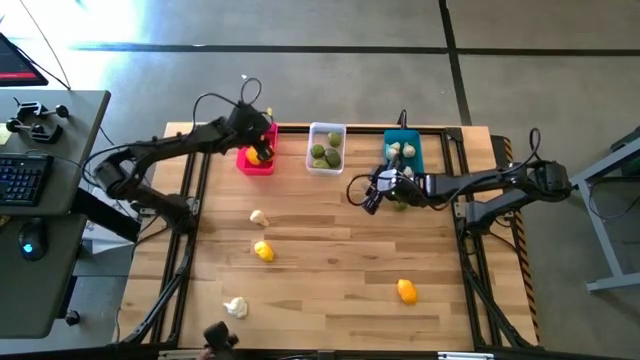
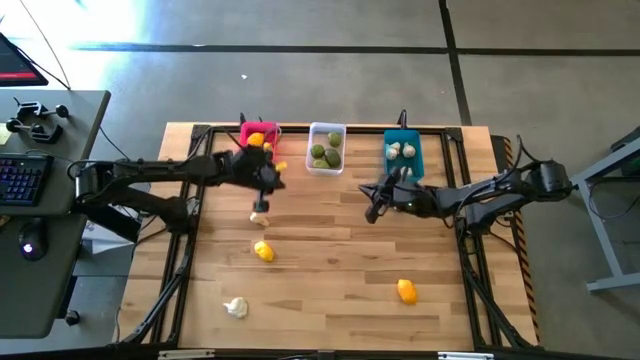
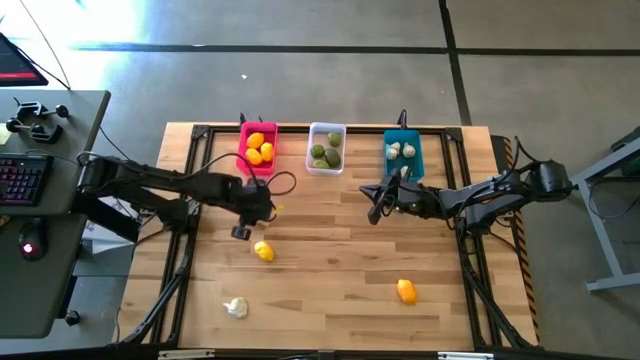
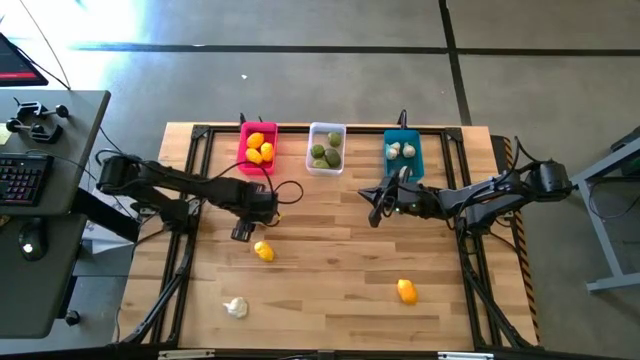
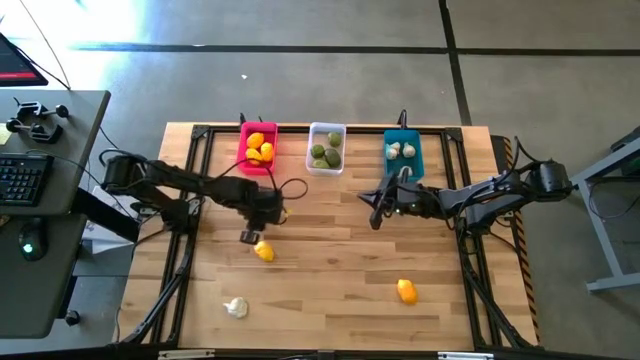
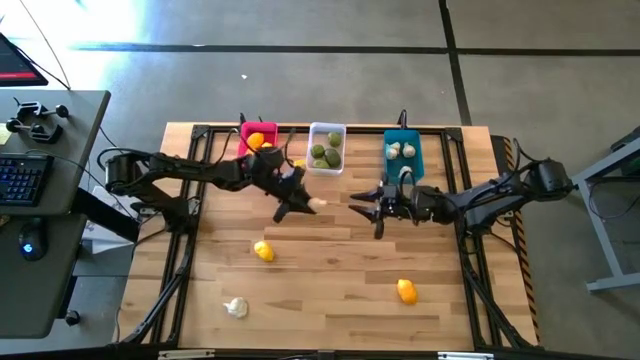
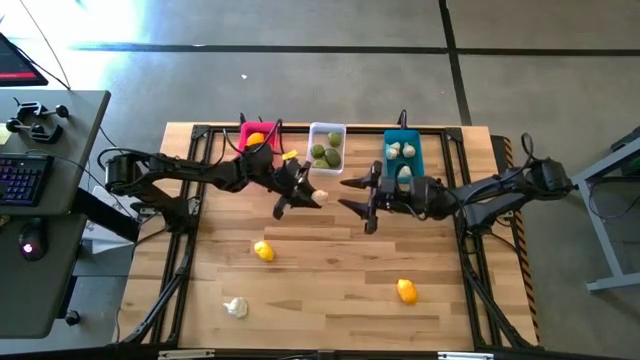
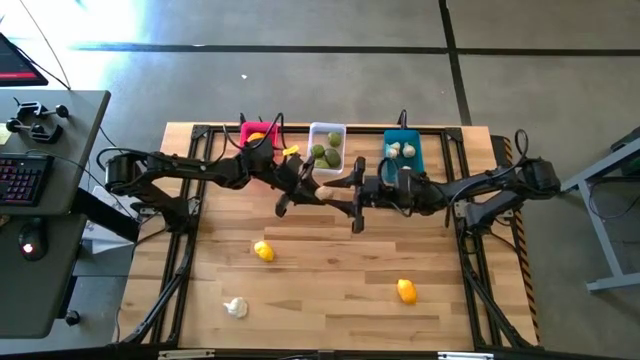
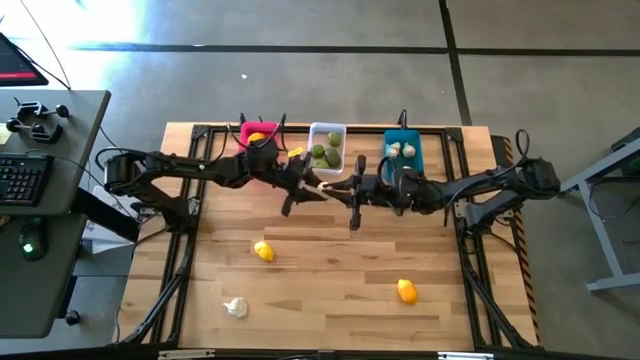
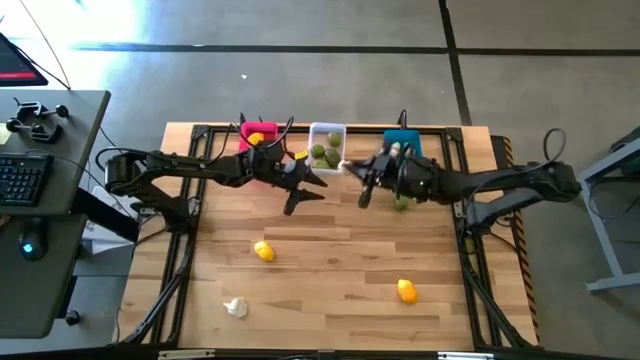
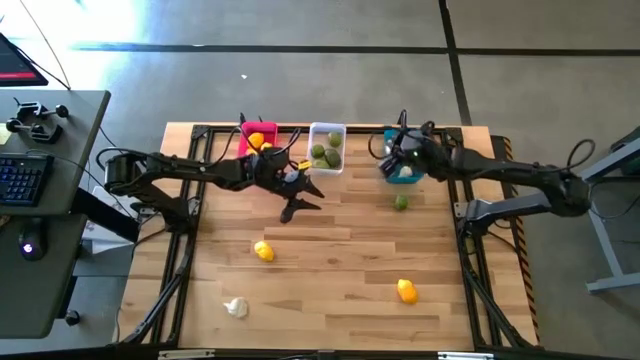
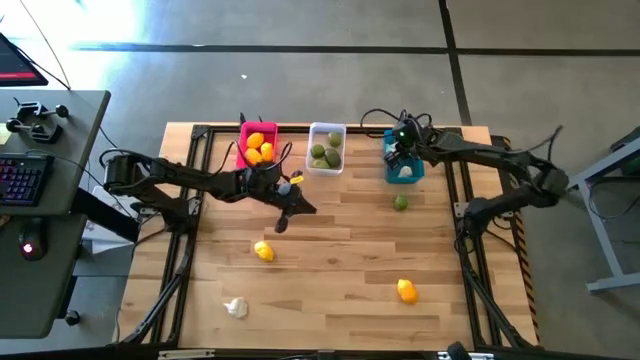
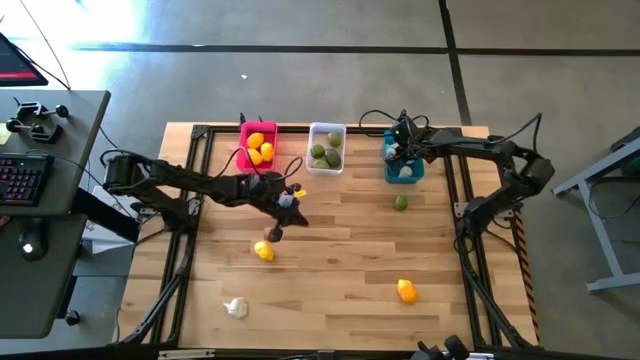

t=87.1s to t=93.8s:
Task: Sort produce into baskets
Put the white garlic into the blue bin

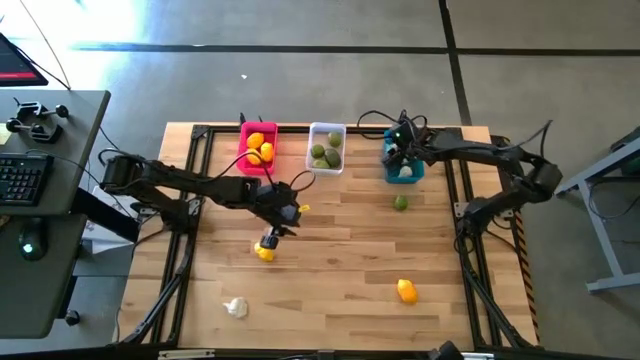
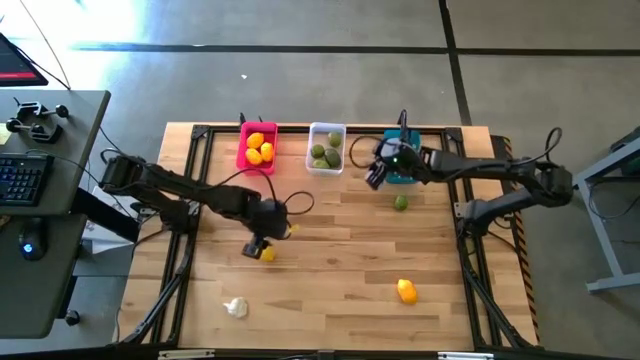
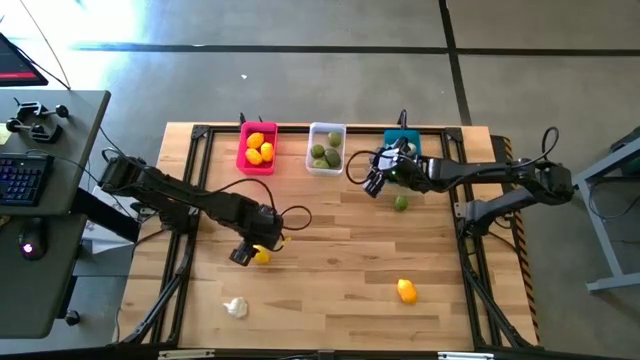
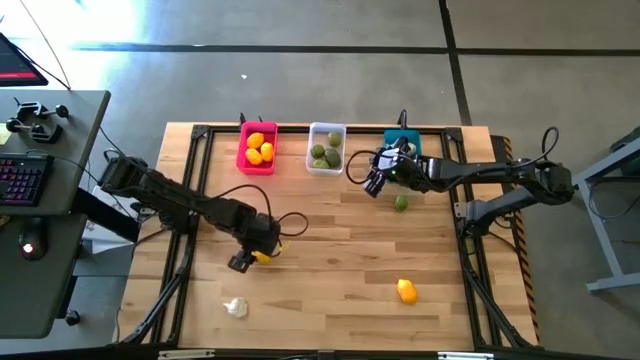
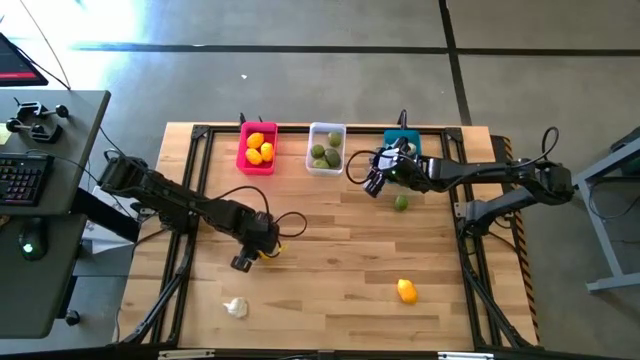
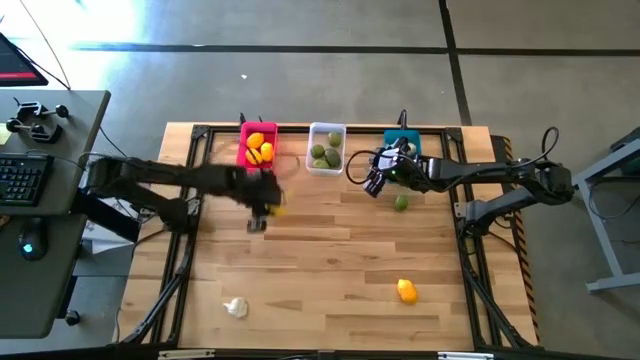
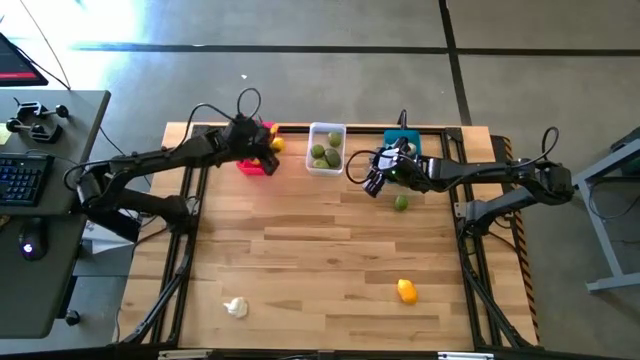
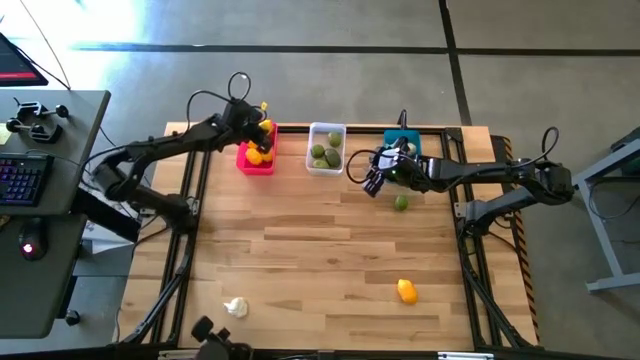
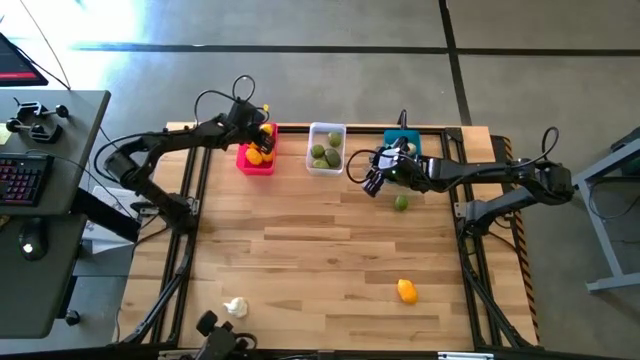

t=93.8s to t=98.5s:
Put the lemon into the pink bin

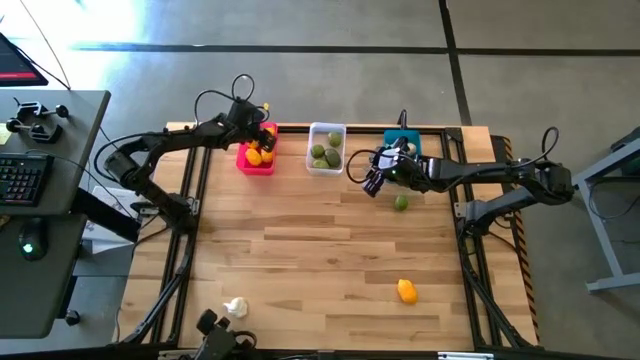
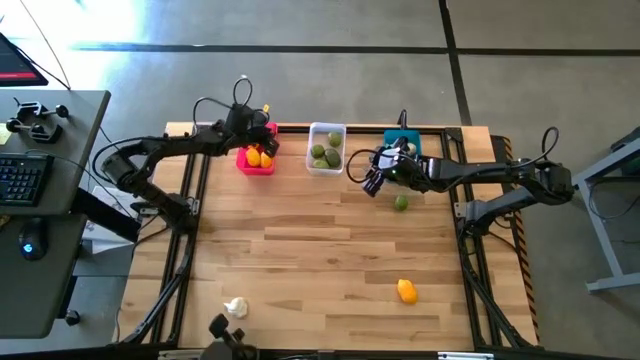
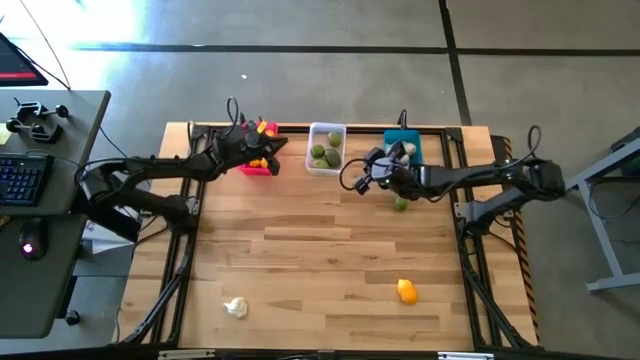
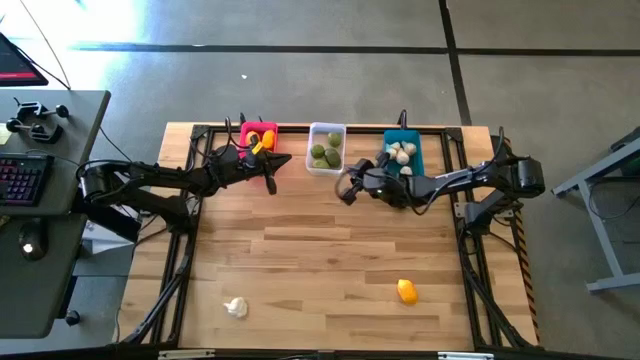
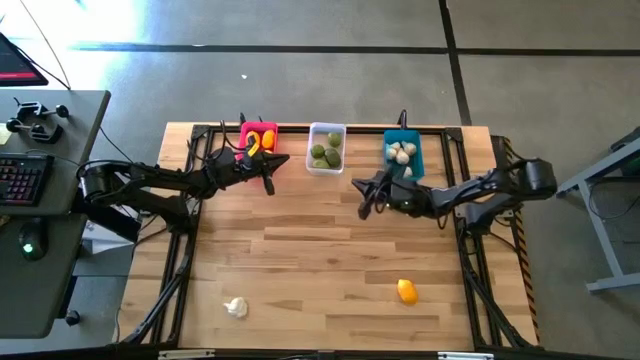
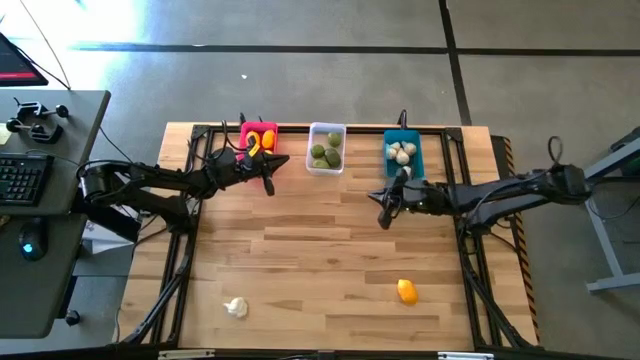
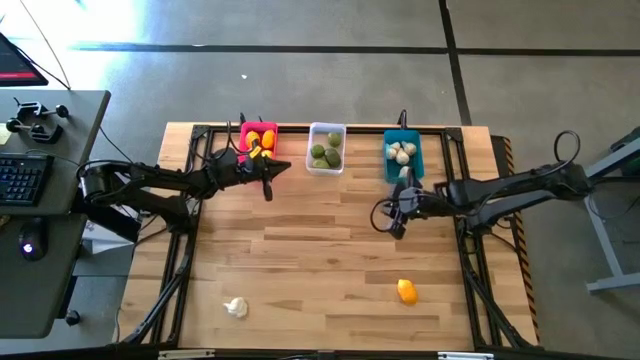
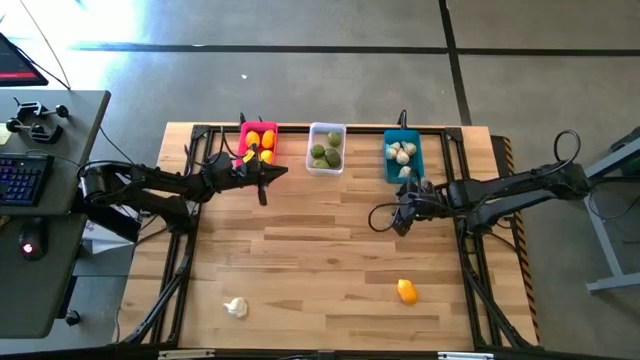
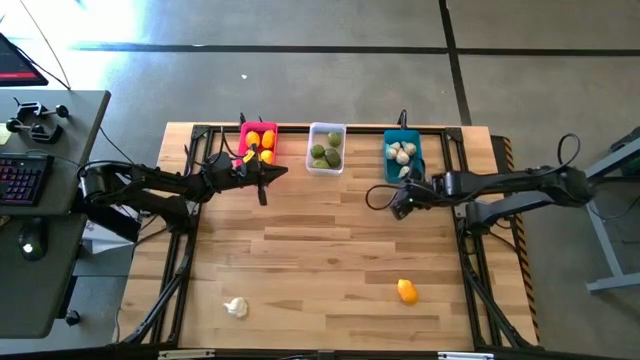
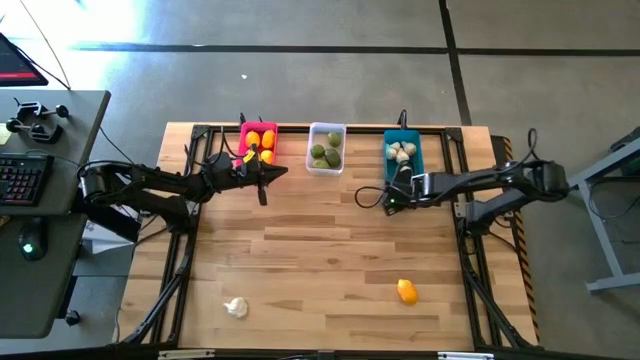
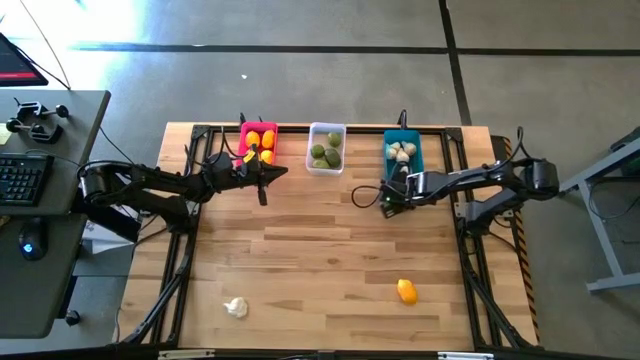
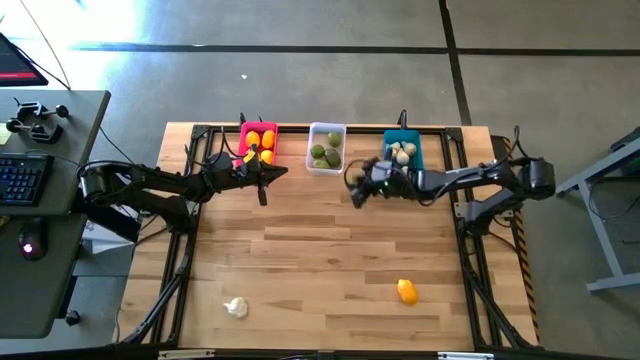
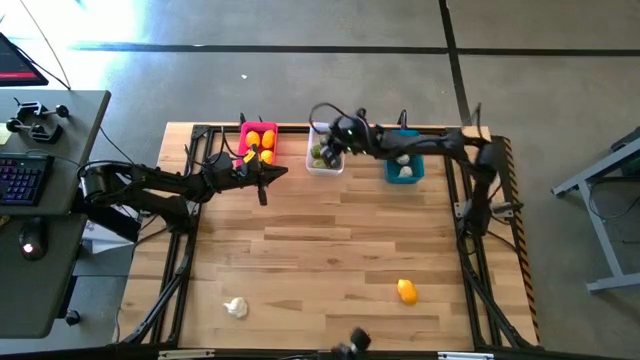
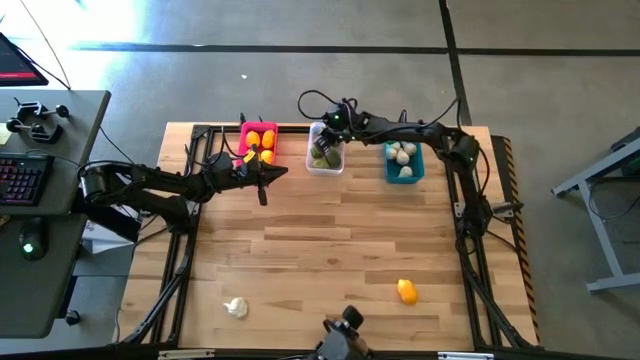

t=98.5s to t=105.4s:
Put the lime into the transparent bin

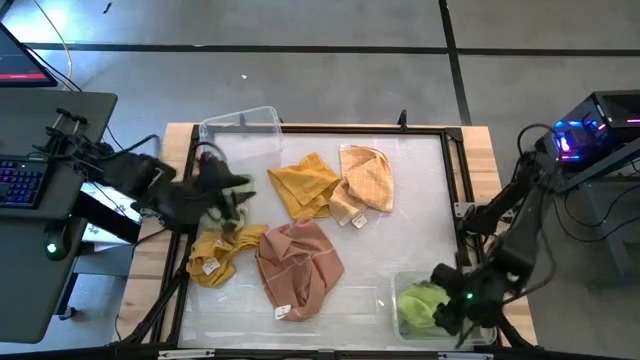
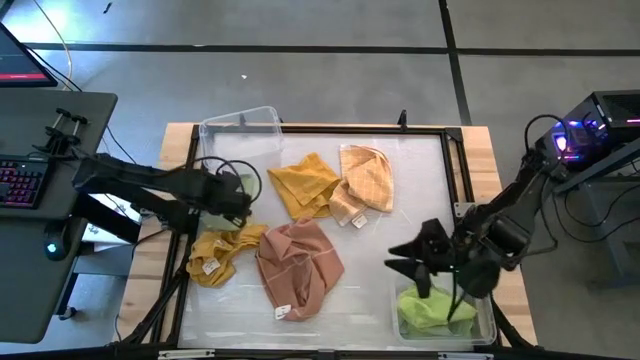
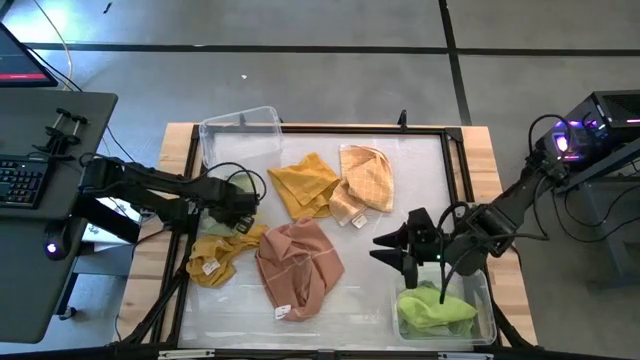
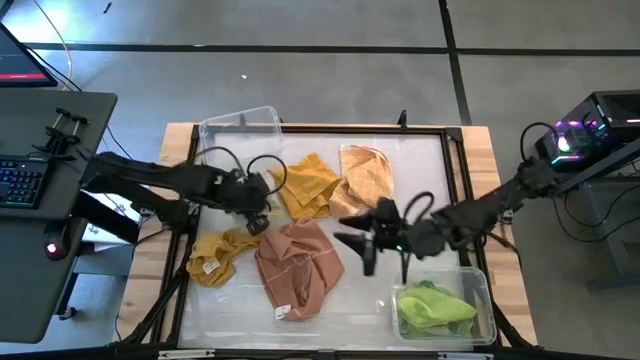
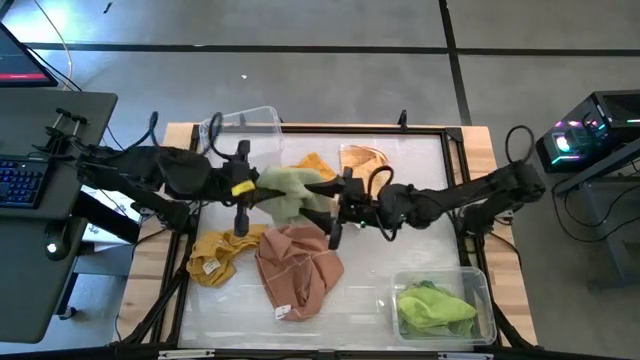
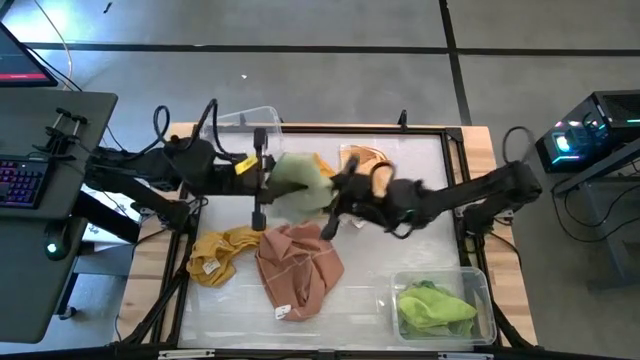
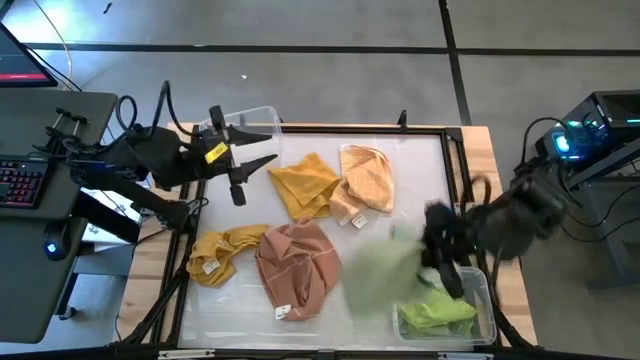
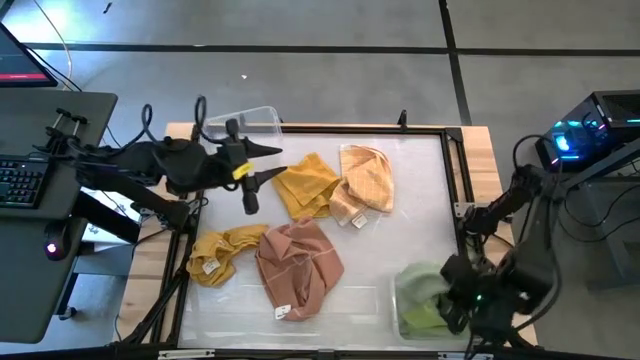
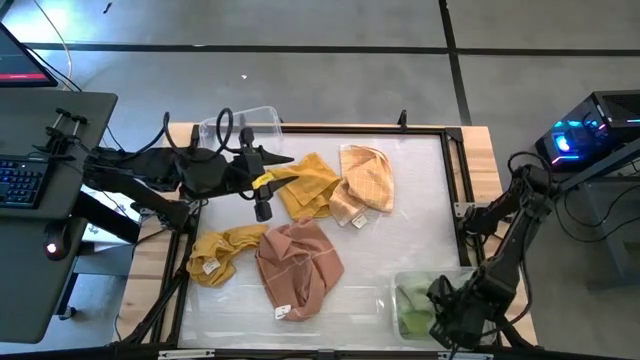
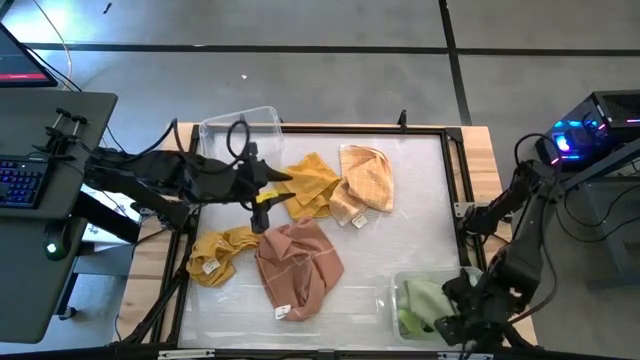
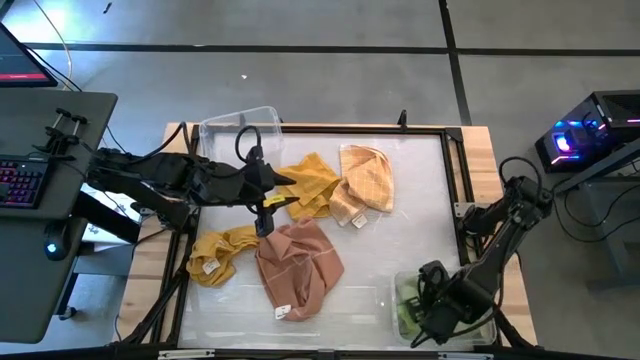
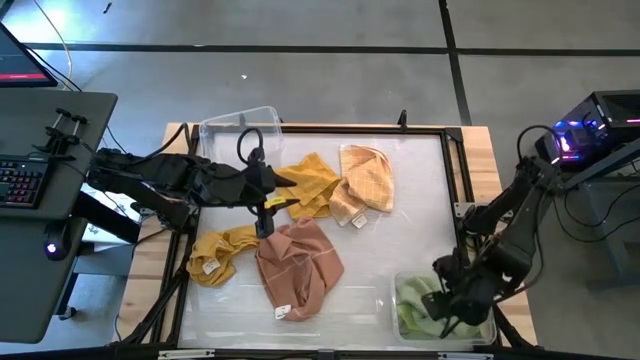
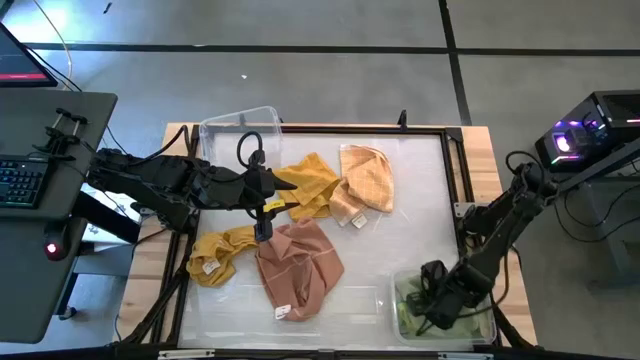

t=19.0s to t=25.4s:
Task: Sort towels by color in basket
Put the green microfiber towel into the bottom transparent bin
